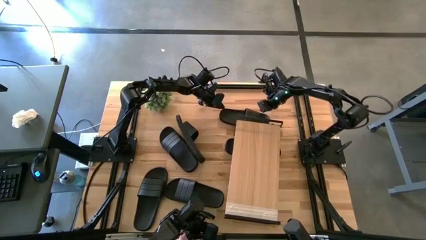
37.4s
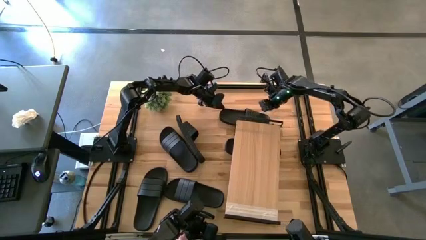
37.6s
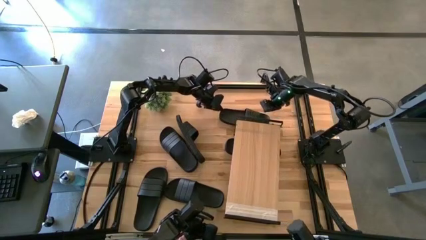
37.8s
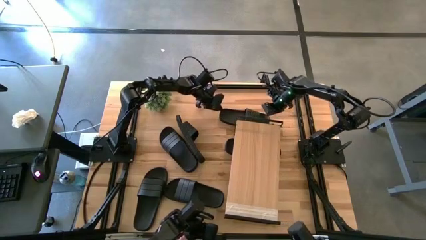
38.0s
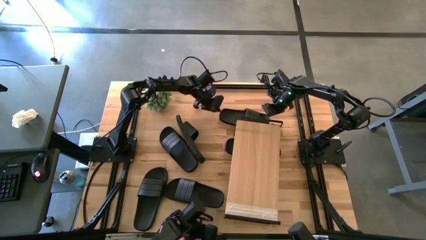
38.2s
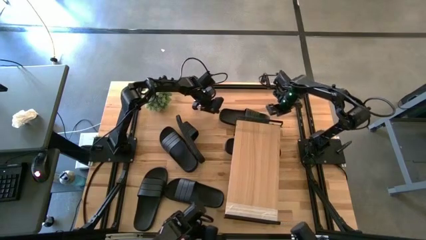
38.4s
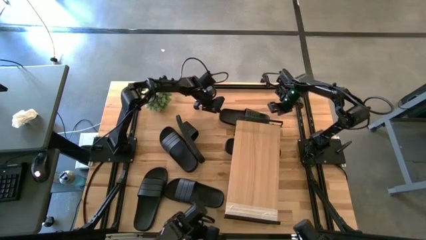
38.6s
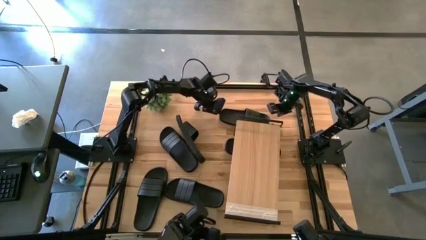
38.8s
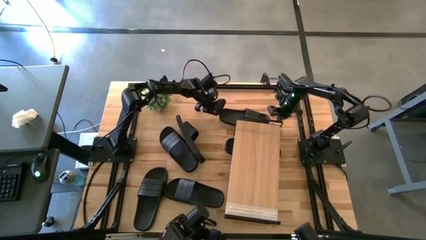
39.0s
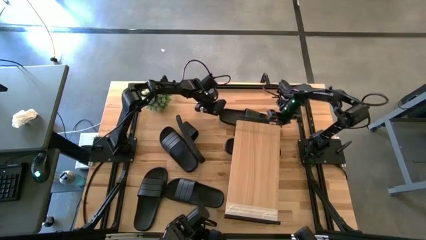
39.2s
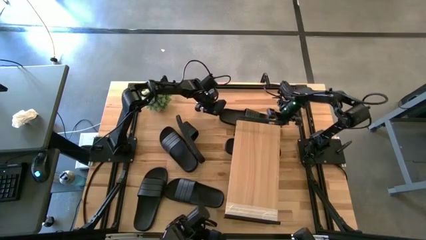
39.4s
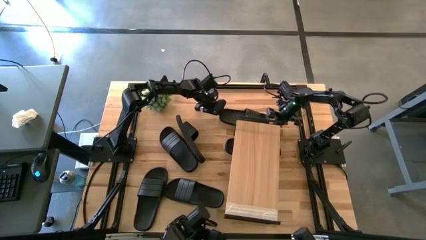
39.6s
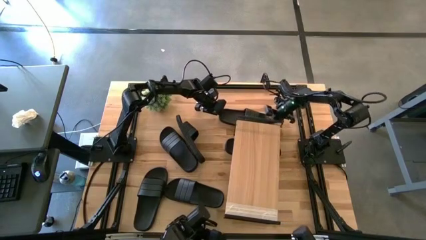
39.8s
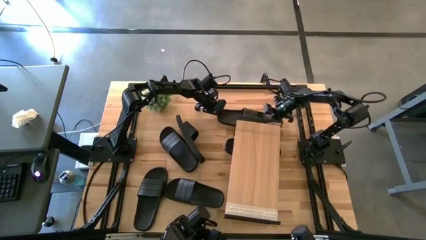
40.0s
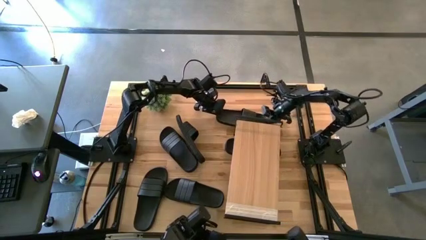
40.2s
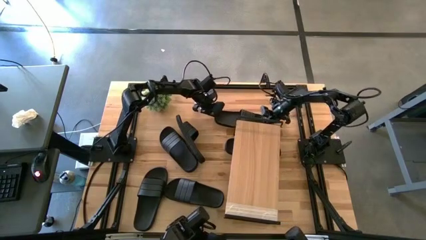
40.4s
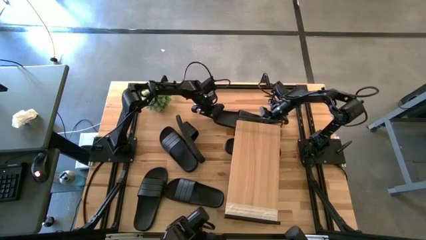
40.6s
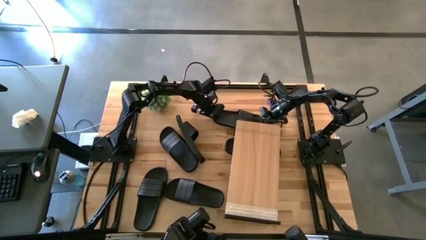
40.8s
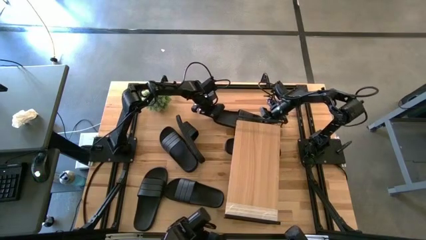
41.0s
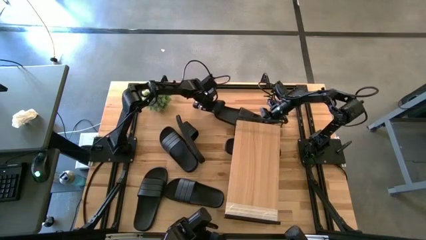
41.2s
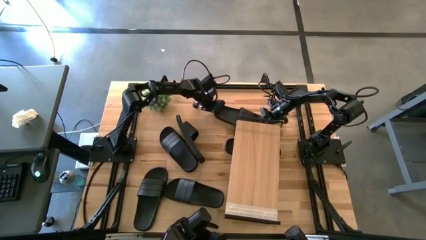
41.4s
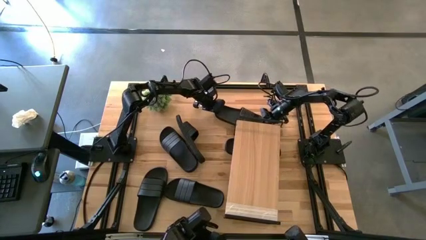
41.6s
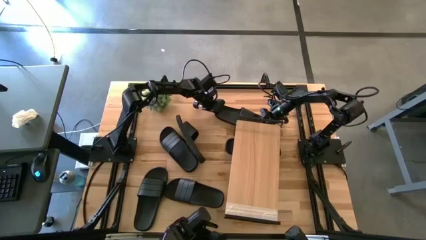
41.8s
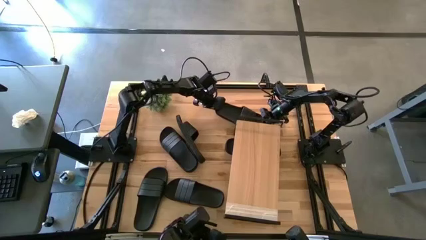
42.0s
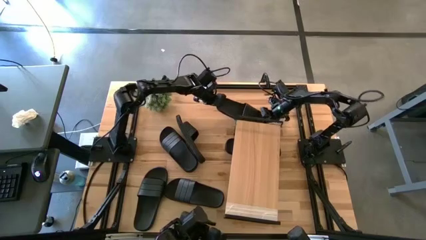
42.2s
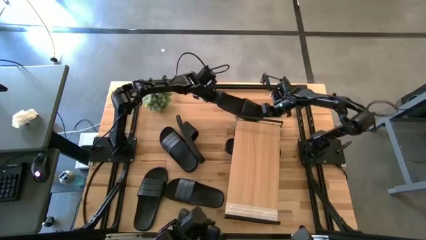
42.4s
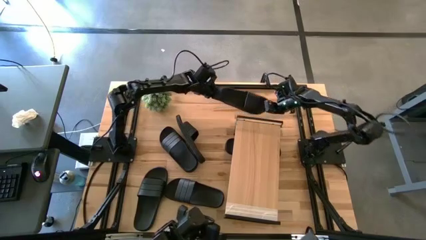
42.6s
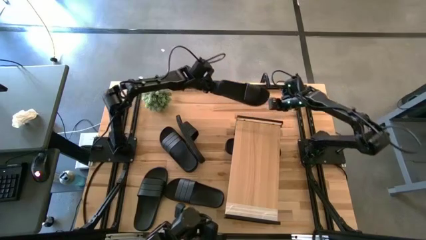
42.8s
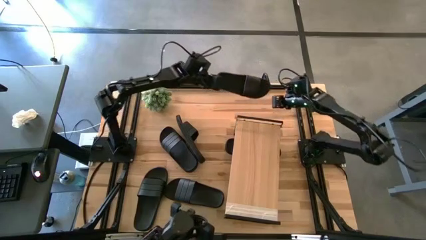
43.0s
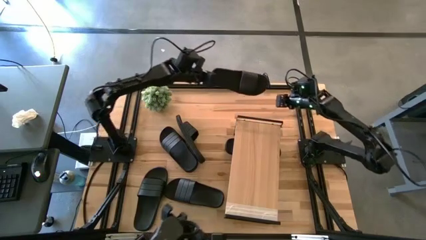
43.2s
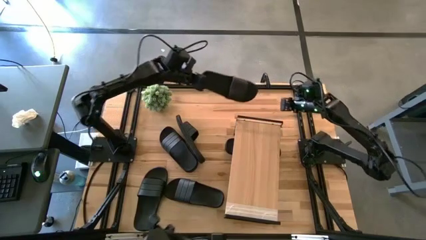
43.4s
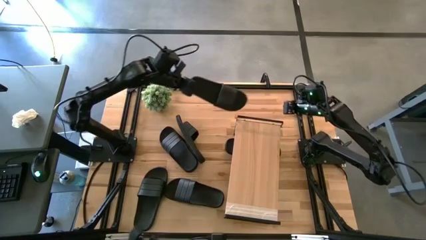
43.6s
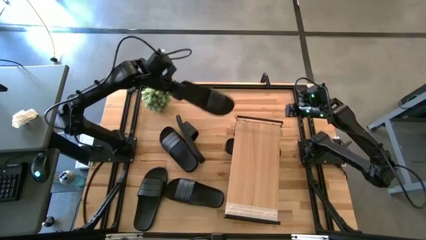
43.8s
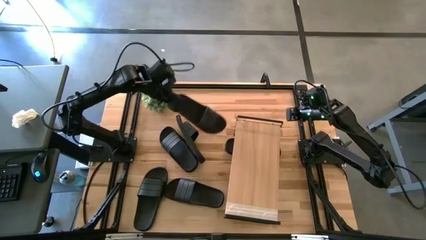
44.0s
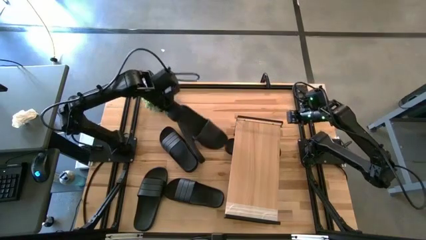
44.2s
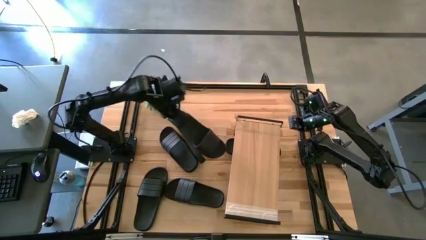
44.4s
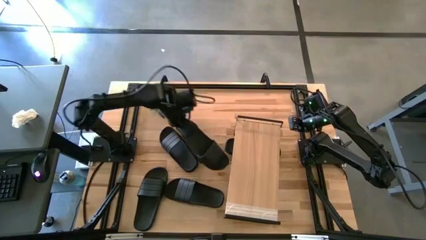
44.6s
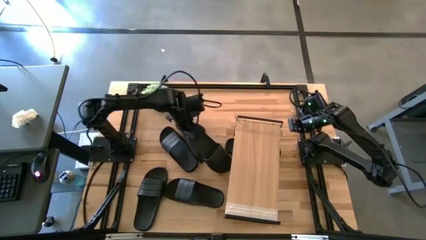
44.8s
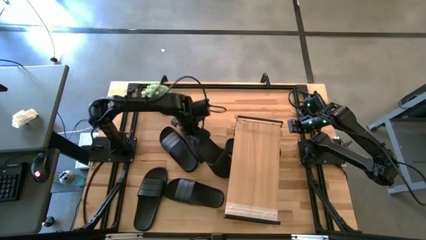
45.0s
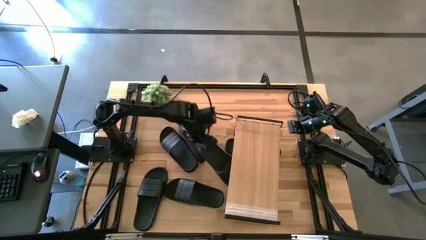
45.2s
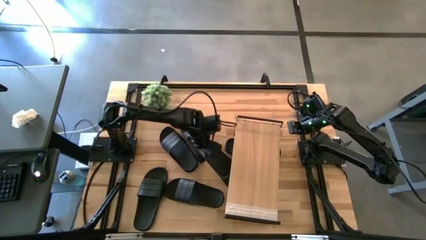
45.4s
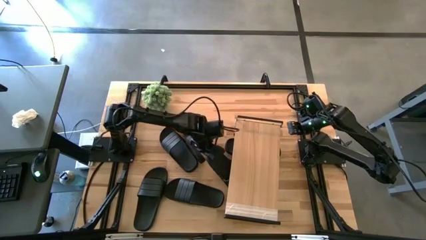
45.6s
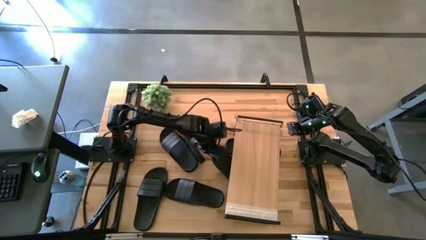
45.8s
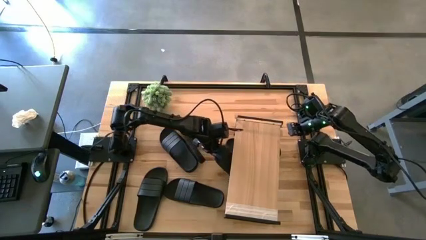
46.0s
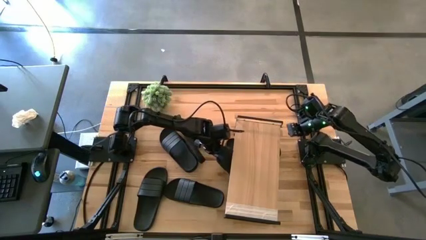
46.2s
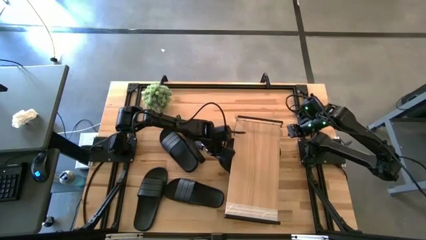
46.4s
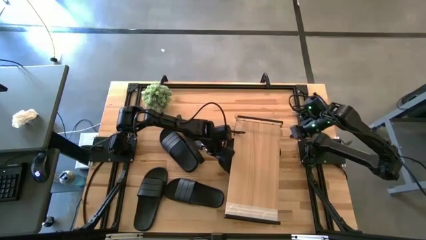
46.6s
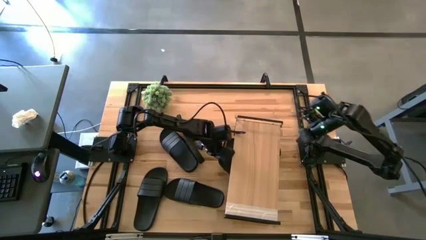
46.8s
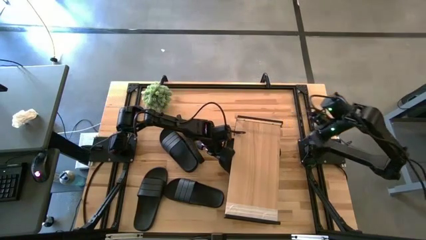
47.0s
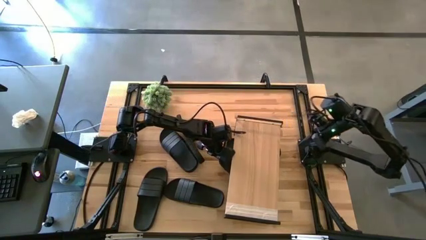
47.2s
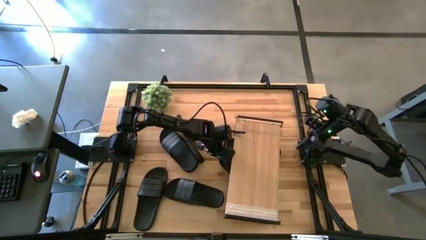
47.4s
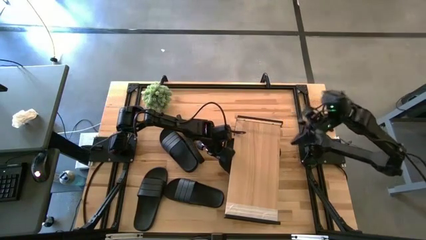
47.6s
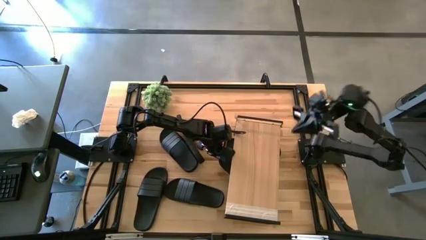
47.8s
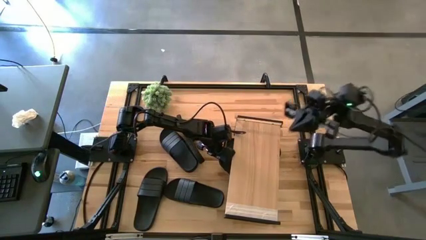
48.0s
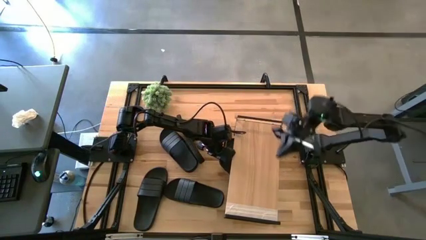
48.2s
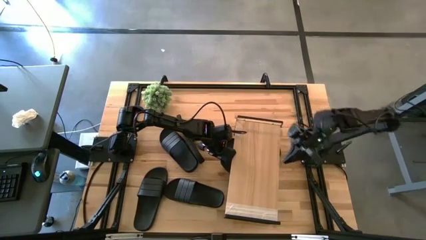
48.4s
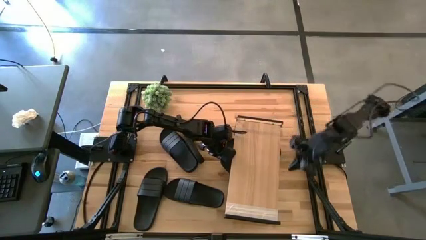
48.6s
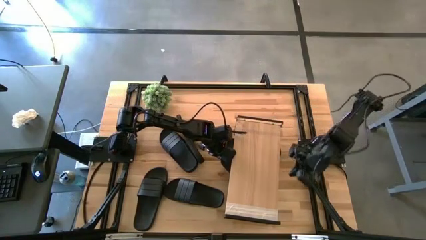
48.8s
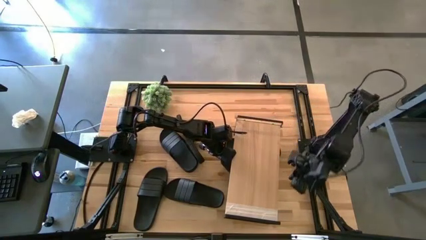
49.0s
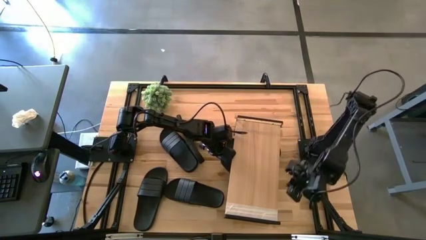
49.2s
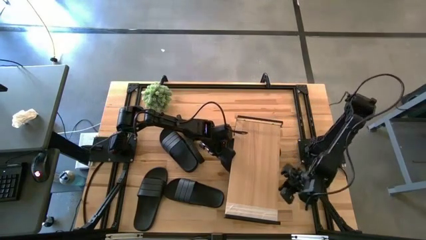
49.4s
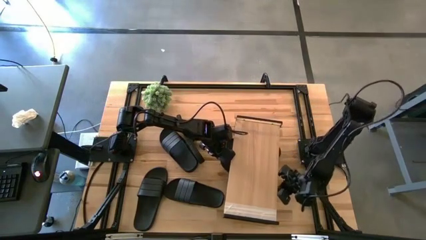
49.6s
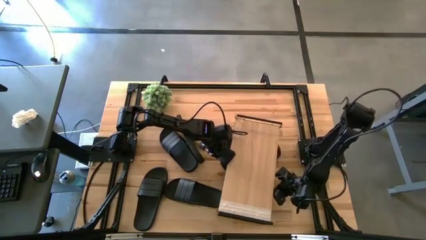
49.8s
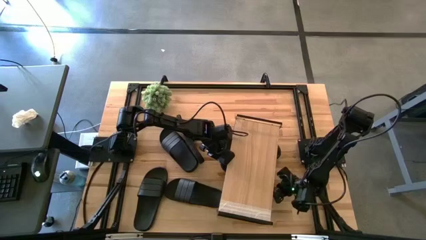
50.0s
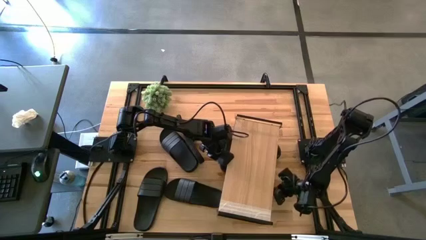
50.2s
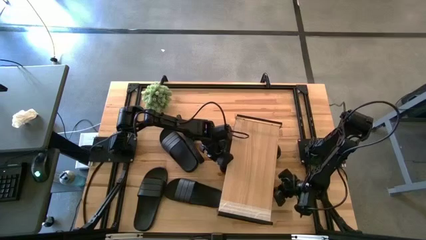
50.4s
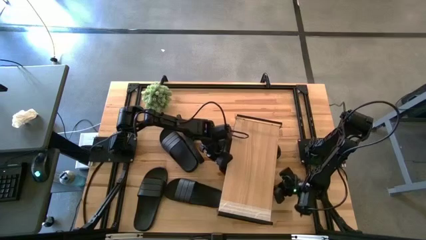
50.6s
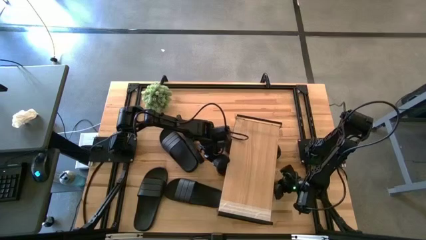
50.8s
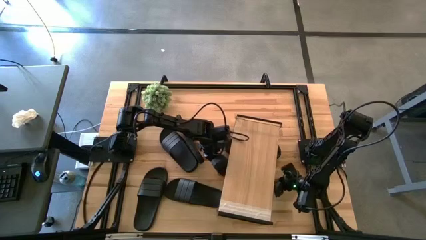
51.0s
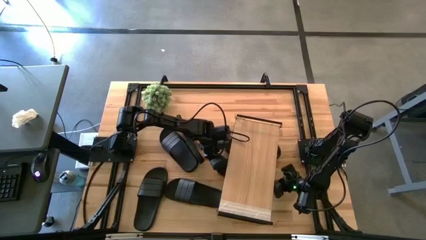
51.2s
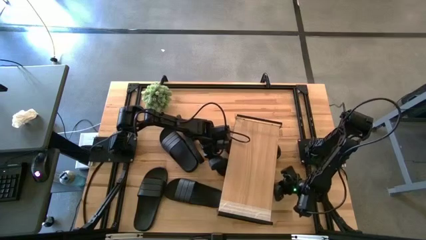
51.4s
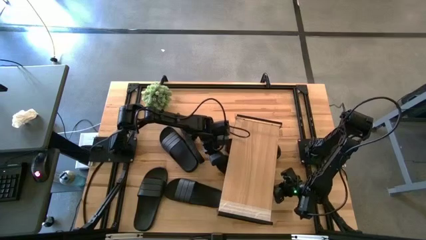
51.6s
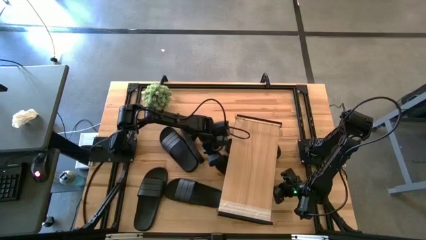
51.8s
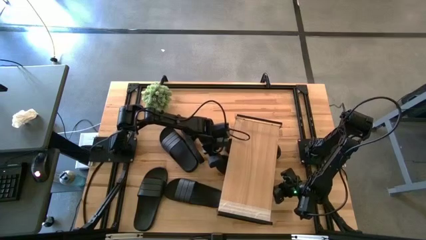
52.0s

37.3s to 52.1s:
Task: Pick and place slides into the shelf
Put the black slide under the shelf
